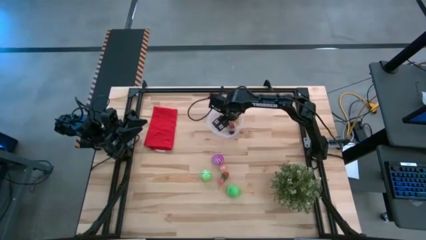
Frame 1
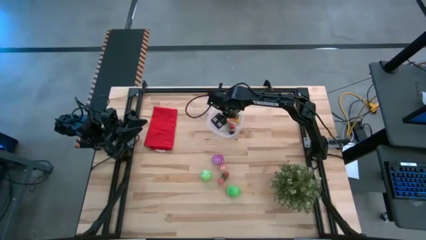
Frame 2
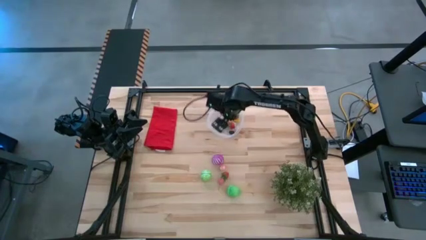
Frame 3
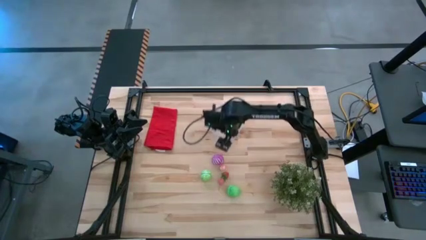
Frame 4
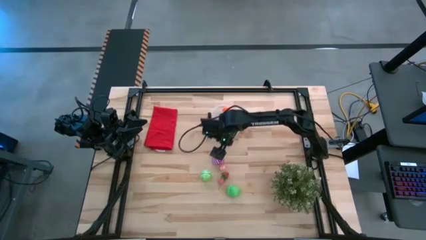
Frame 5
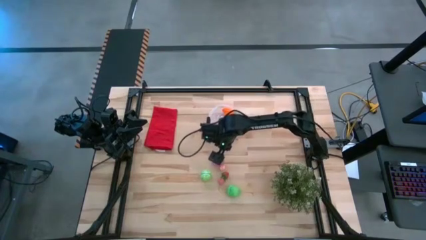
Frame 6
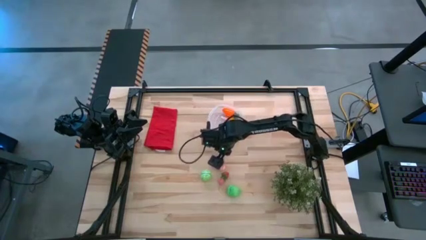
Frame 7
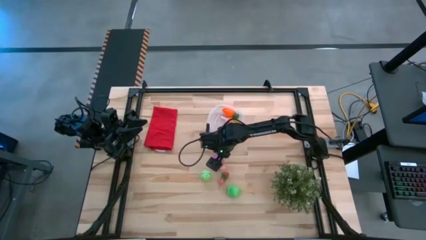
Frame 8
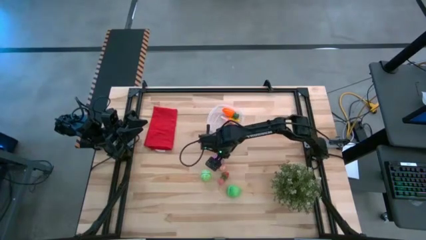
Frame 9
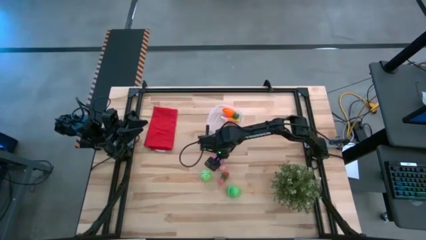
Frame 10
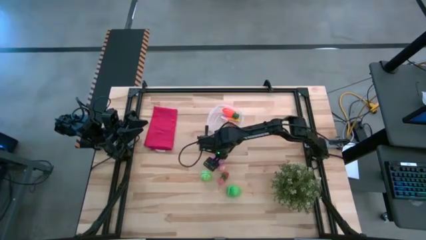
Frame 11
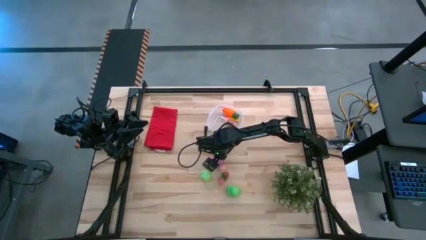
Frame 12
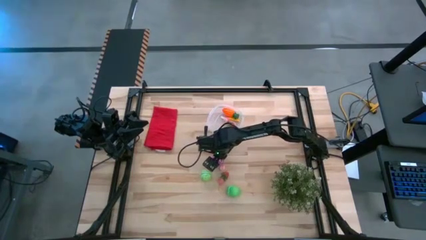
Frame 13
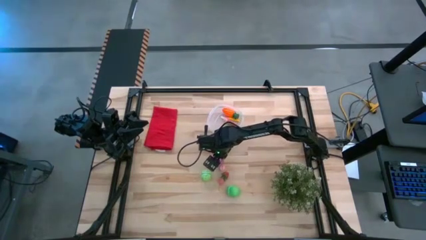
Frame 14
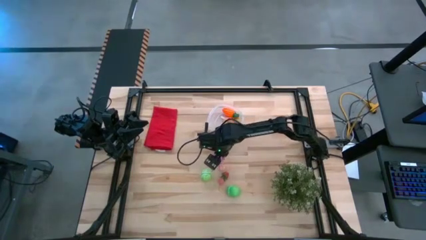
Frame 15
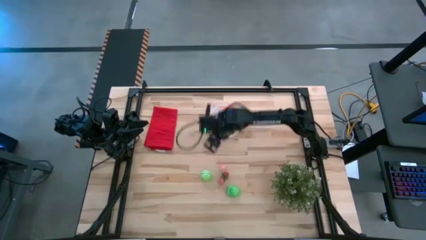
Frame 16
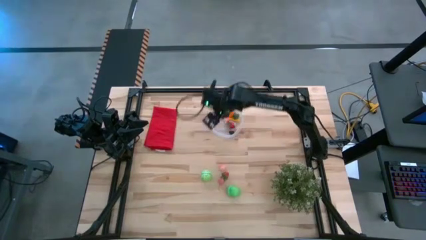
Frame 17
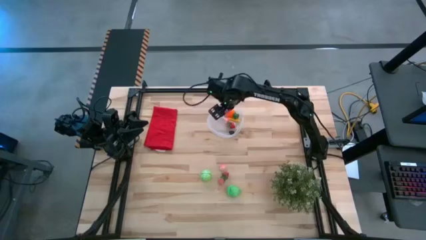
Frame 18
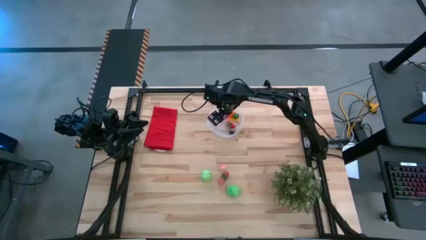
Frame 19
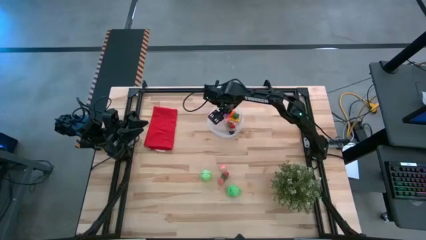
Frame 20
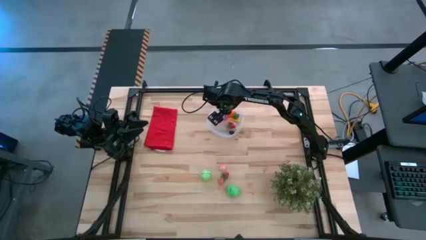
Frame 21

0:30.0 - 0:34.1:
Task: Pick and placing Produce into tupperware
Put the purple onion into the transparent bin

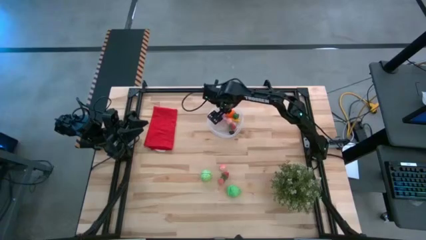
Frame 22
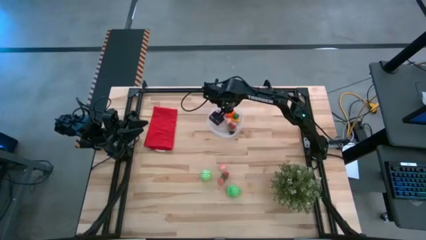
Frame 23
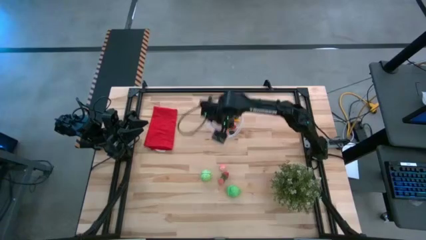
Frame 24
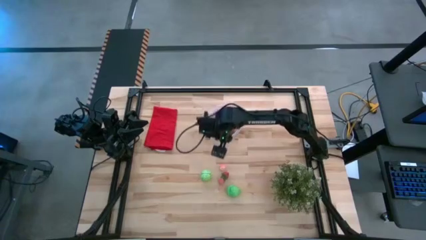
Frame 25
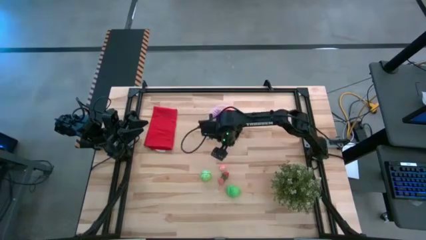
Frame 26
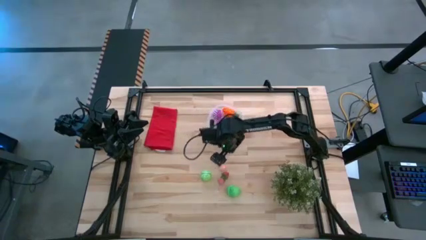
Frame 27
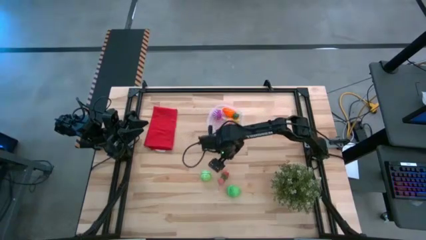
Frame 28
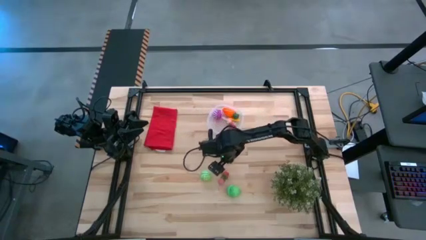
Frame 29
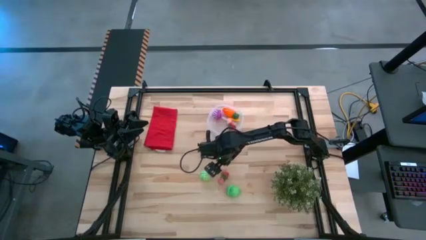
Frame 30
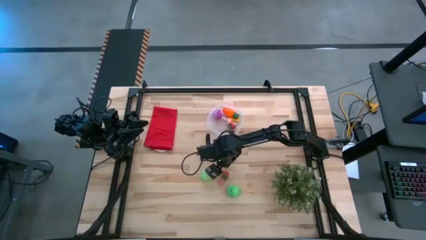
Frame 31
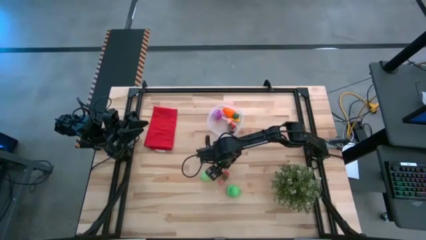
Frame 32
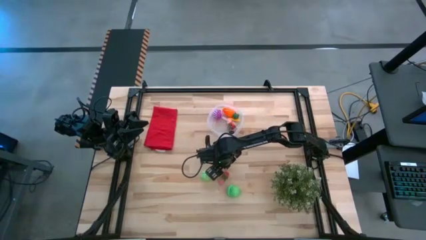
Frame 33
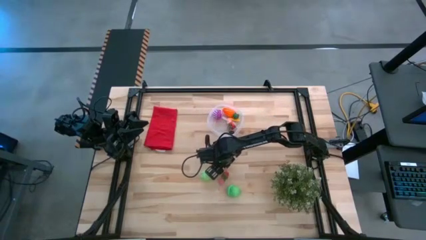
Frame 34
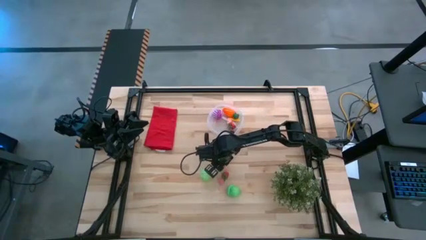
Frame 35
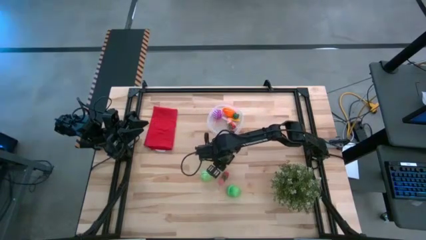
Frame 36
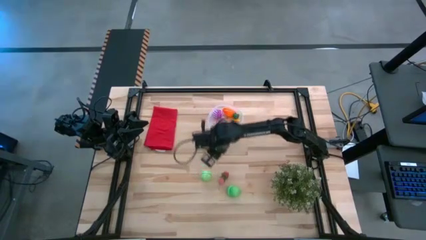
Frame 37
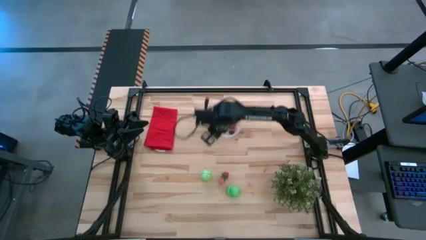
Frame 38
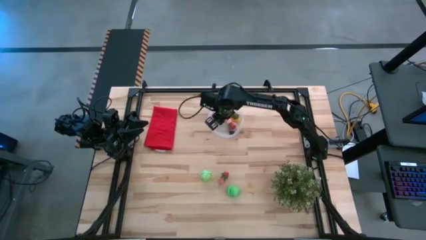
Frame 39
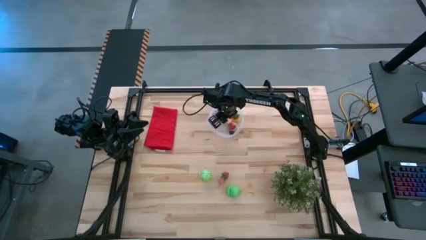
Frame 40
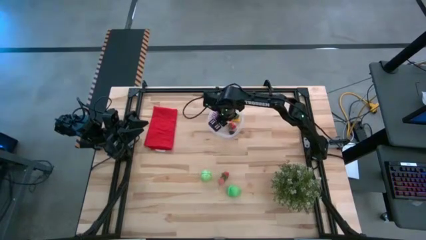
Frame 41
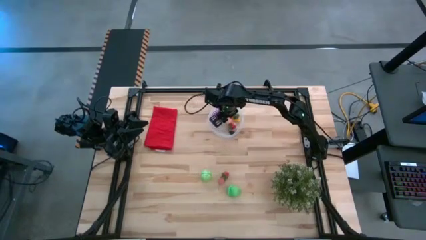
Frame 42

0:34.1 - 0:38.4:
Put the top pink peach into the transparent bin

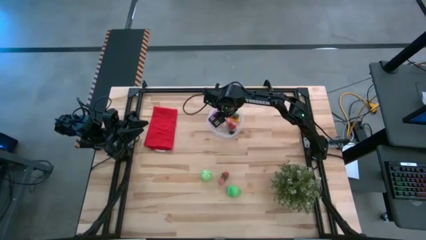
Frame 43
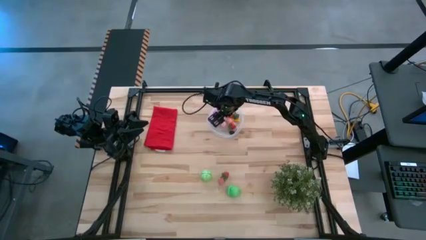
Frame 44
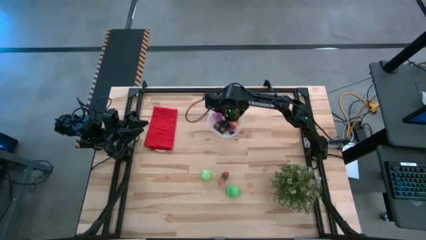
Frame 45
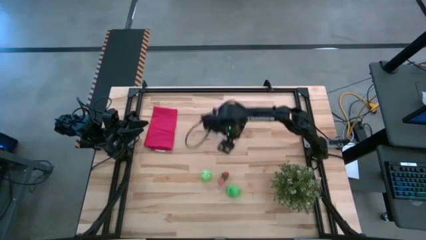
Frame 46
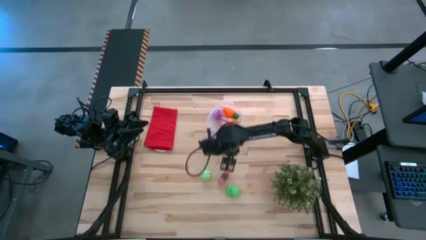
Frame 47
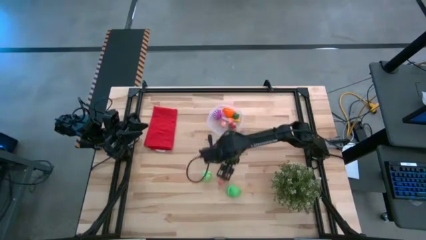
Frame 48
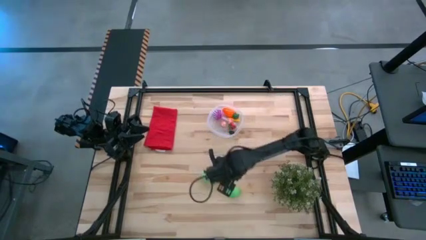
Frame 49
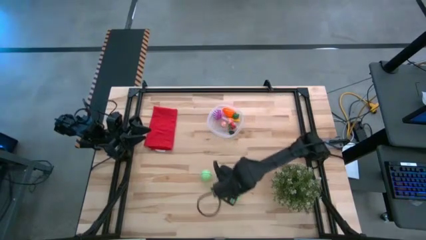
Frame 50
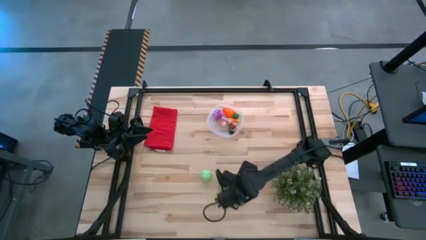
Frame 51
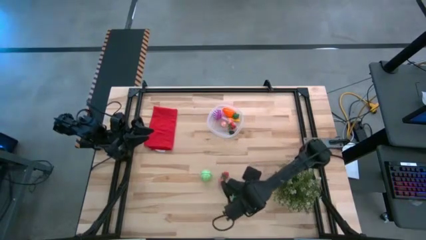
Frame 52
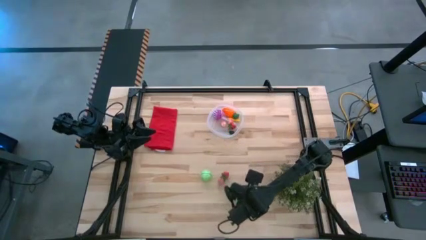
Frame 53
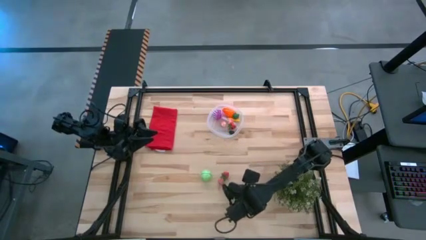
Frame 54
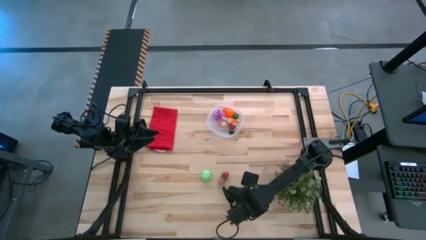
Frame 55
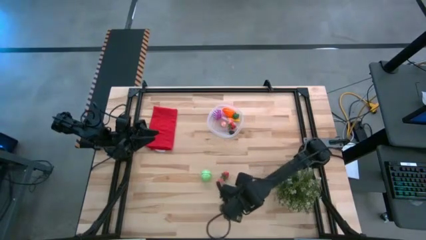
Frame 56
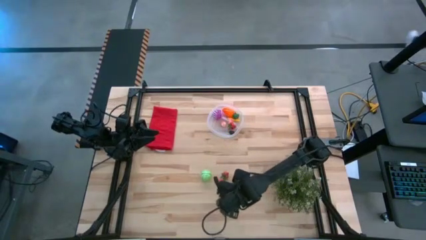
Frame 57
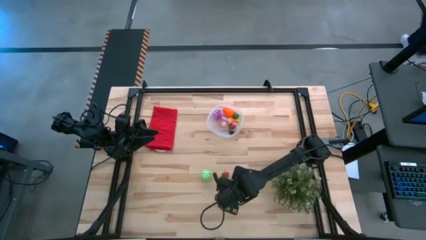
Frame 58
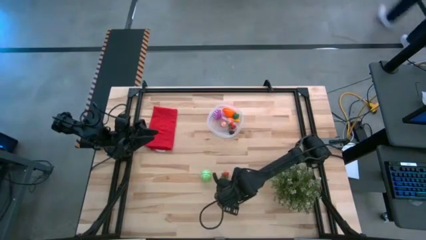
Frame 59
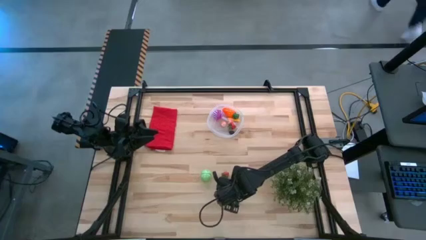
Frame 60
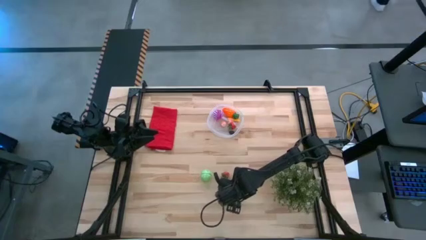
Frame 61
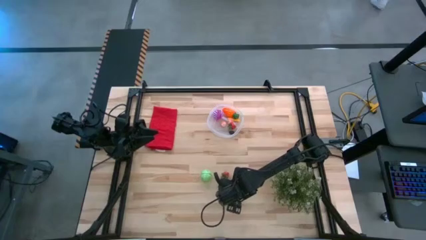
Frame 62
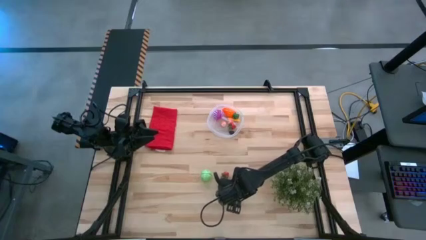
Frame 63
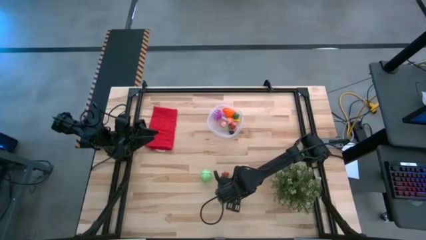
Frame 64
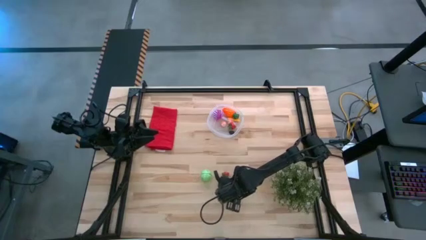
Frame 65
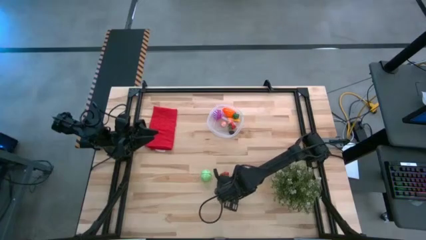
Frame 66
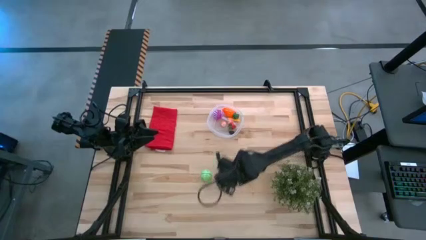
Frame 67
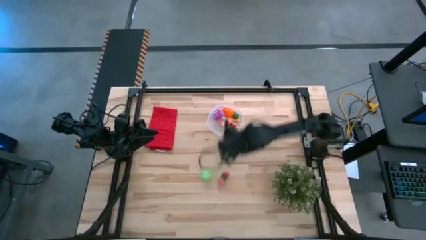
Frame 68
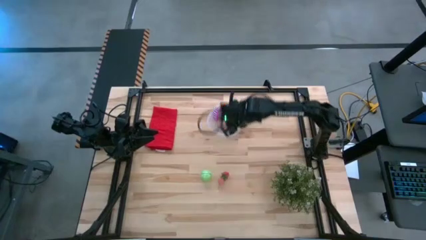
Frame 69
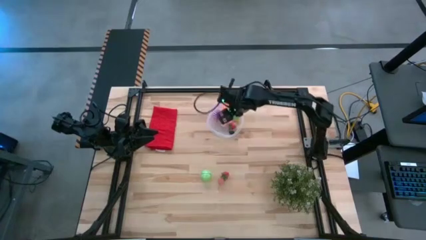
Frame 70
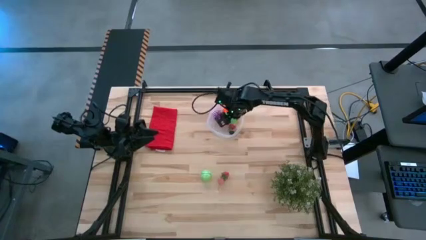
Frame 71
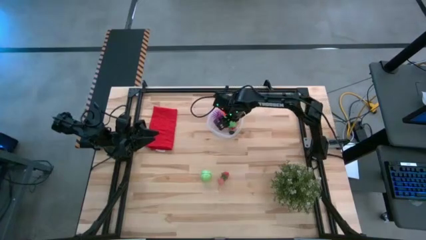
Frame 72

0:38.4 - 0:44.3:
Put the green pear into the transparent bin

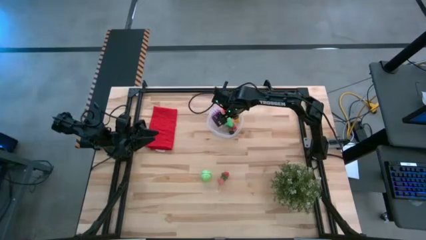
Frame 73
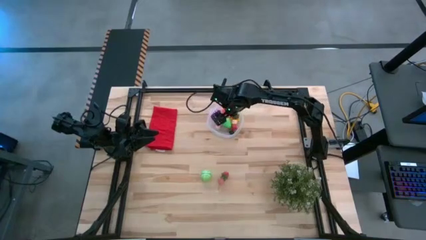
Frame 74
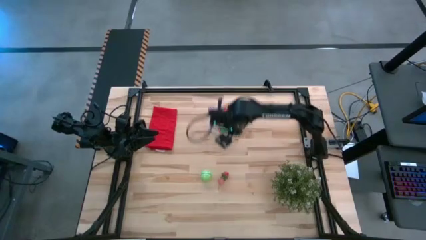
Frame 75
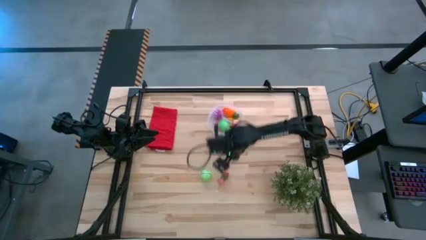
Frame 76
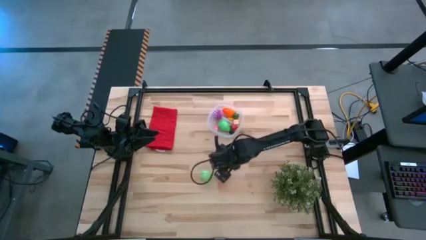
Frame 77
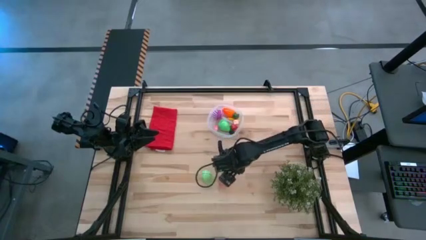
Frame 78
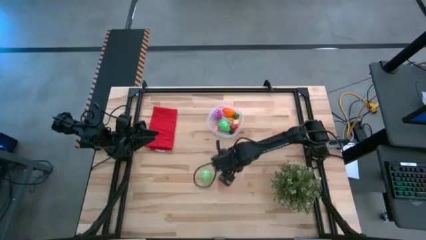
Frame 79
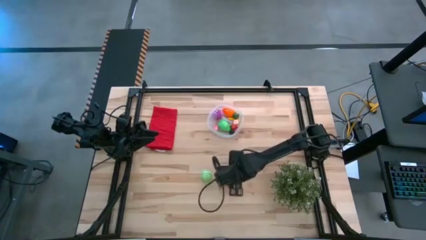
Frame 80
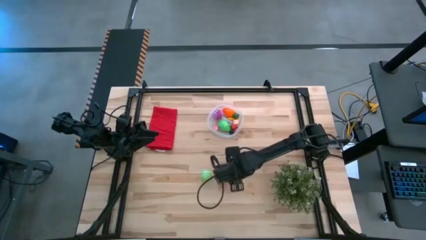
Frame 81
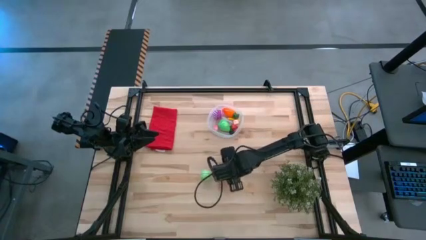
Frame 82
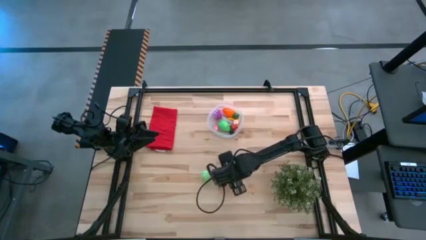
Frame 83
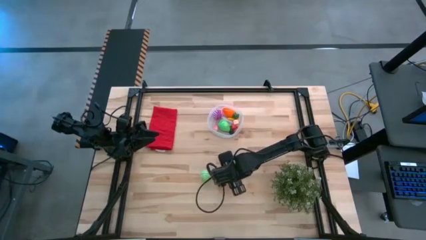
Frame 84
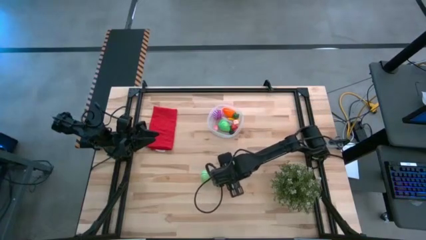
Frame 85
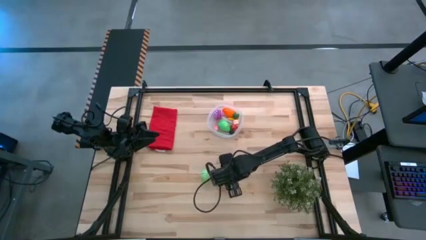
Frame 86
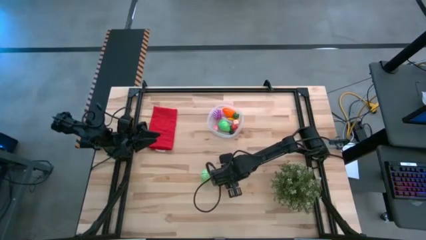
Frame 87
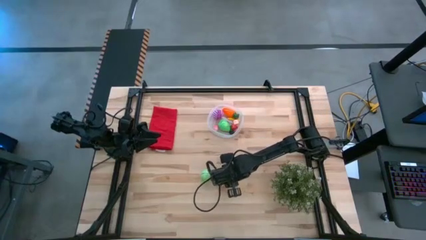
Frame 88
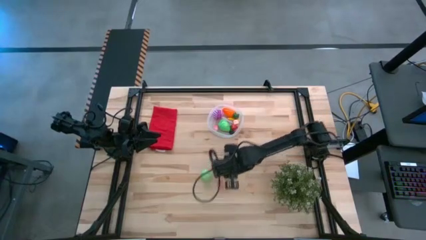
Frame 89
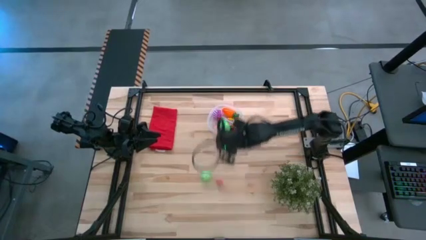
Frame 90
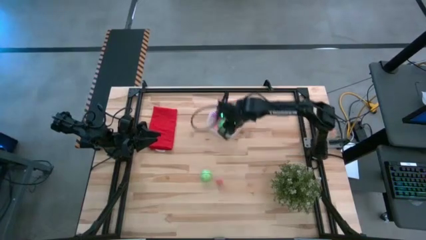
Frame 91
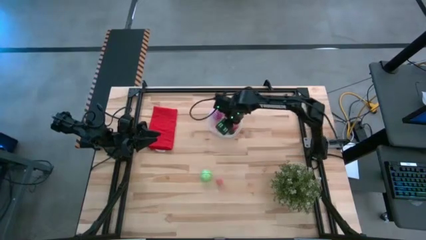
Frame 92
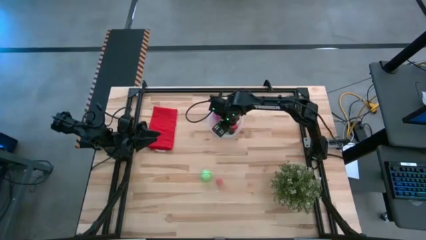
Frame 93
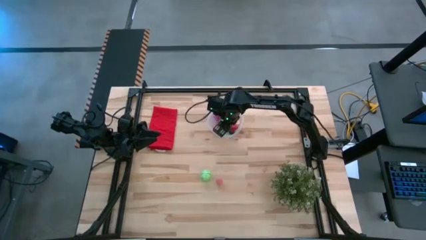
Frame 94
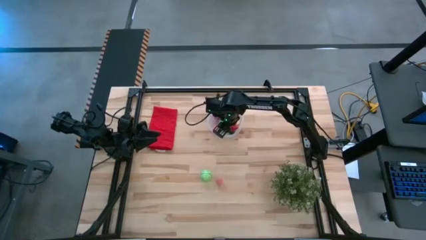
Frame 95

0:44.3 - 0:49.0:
Put the red strawberry into the transparent bin
